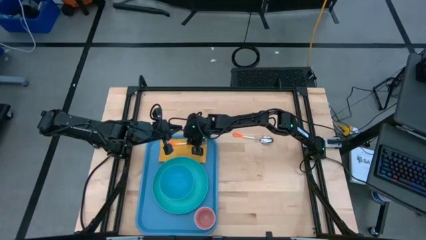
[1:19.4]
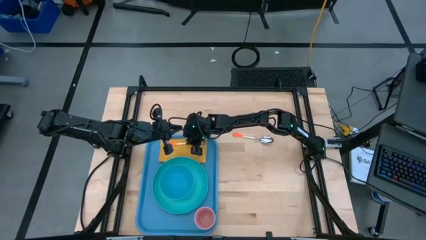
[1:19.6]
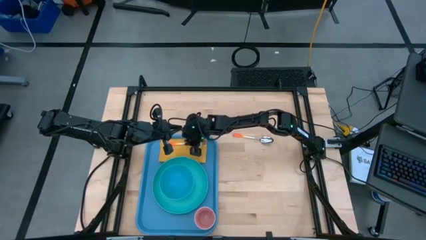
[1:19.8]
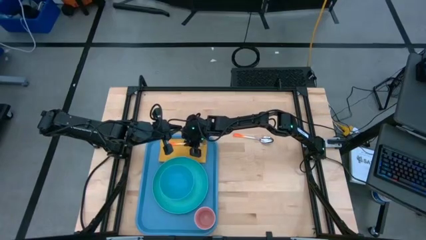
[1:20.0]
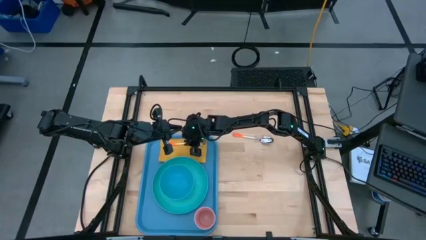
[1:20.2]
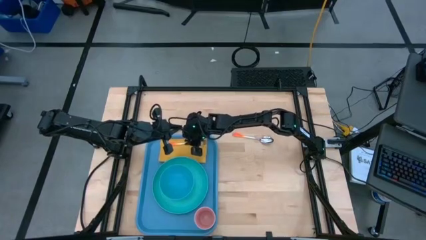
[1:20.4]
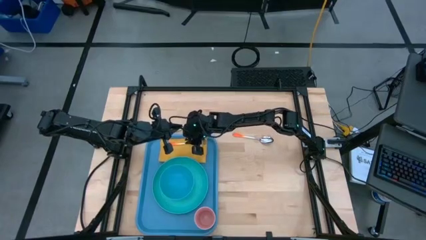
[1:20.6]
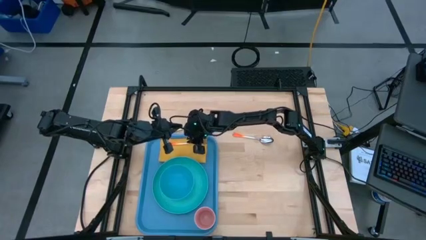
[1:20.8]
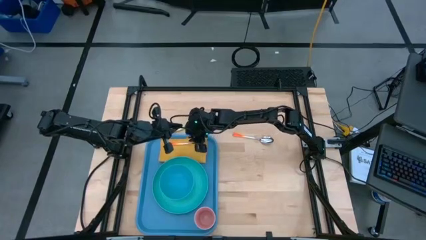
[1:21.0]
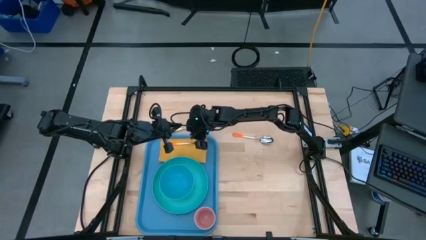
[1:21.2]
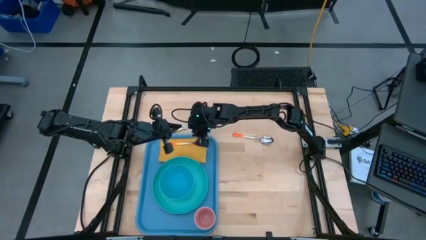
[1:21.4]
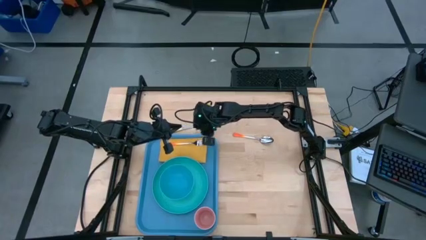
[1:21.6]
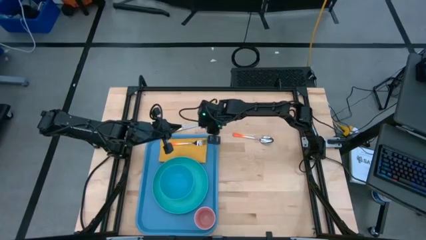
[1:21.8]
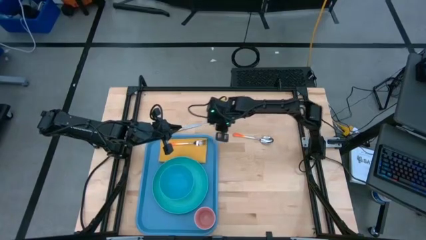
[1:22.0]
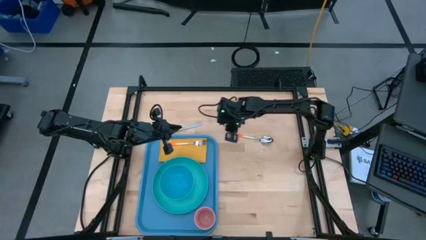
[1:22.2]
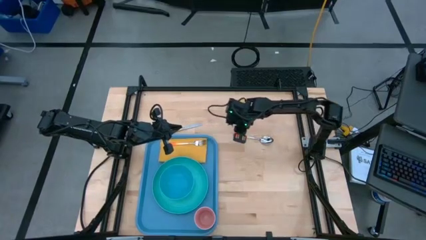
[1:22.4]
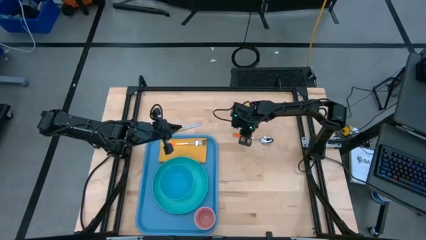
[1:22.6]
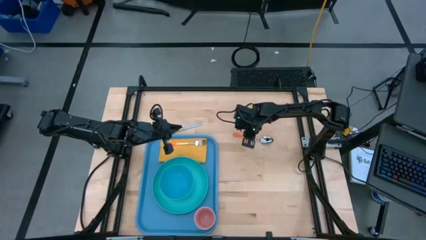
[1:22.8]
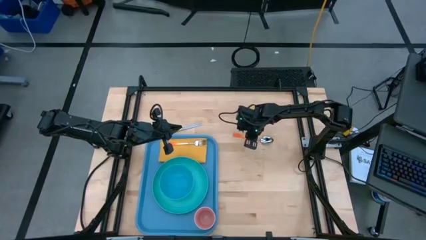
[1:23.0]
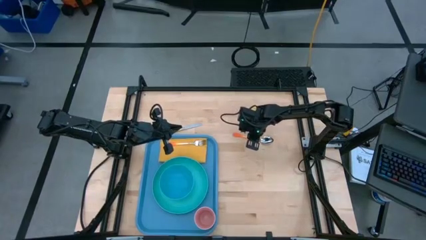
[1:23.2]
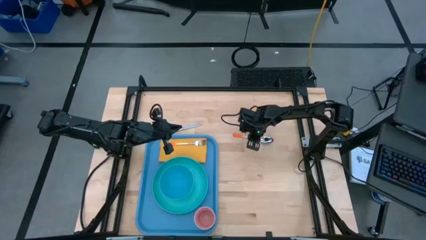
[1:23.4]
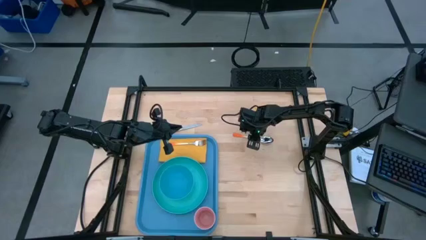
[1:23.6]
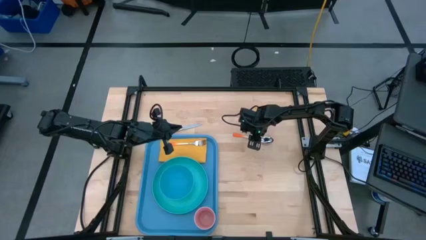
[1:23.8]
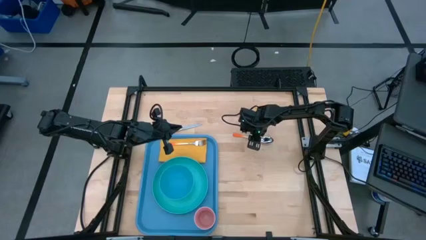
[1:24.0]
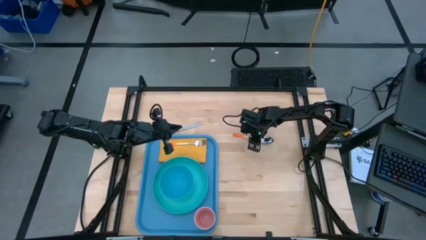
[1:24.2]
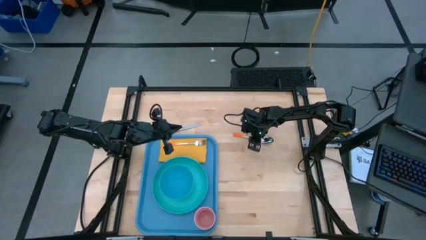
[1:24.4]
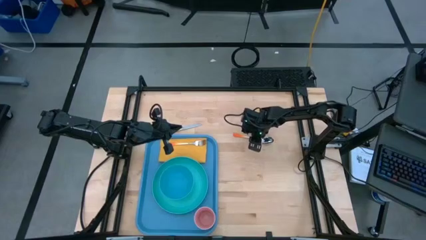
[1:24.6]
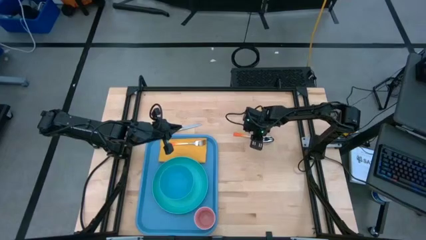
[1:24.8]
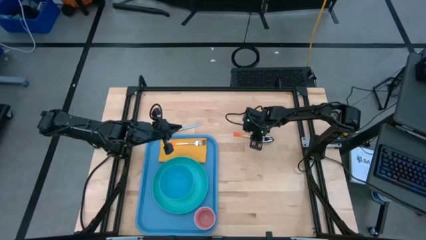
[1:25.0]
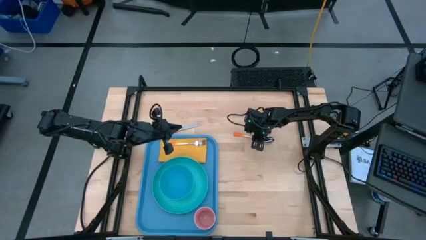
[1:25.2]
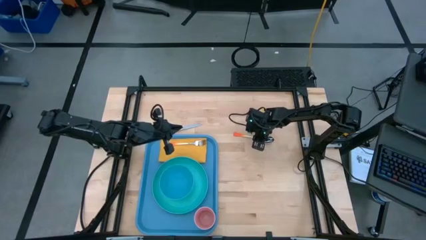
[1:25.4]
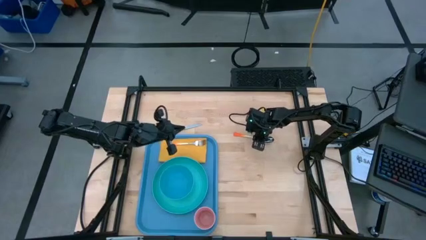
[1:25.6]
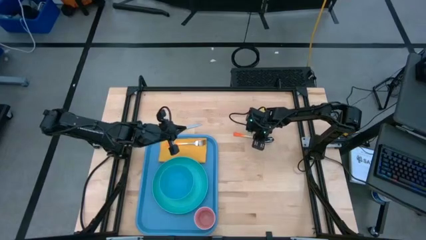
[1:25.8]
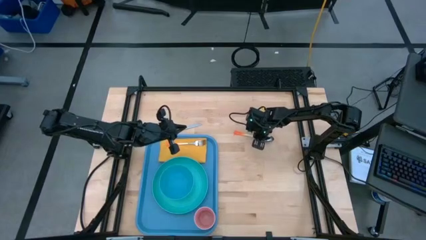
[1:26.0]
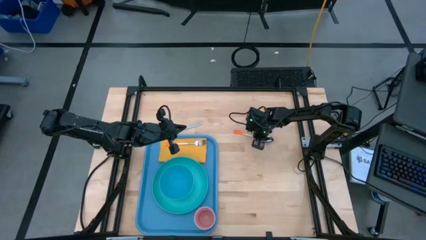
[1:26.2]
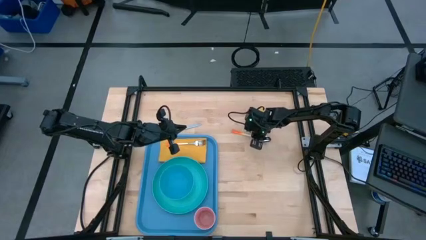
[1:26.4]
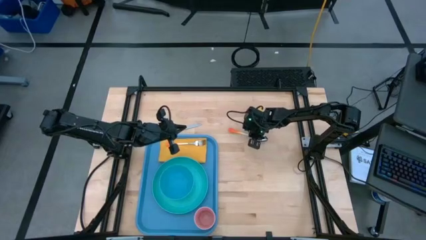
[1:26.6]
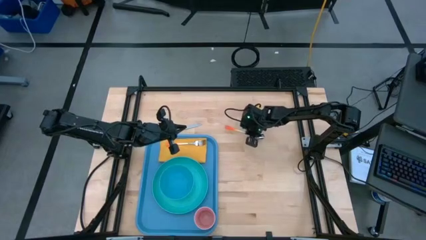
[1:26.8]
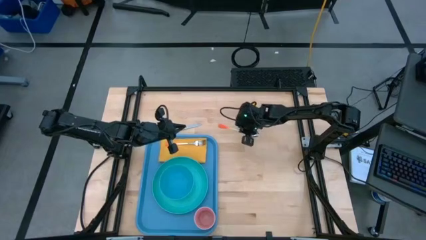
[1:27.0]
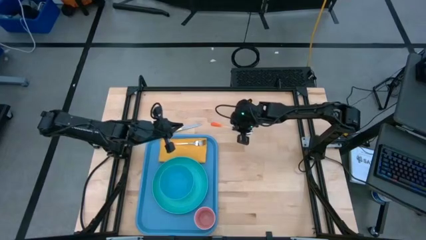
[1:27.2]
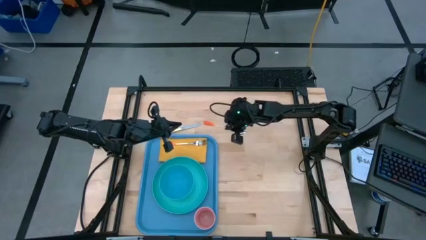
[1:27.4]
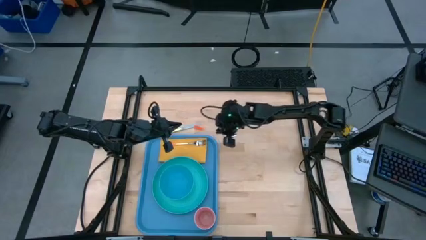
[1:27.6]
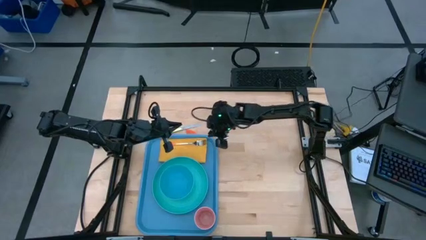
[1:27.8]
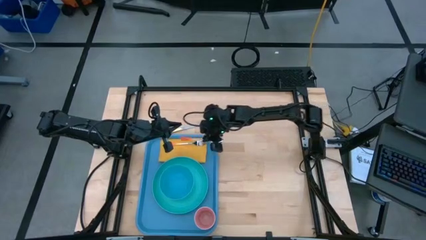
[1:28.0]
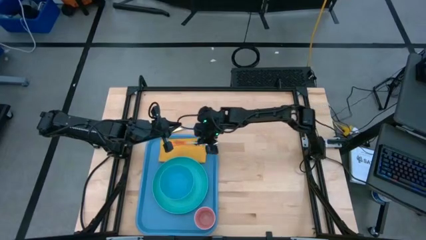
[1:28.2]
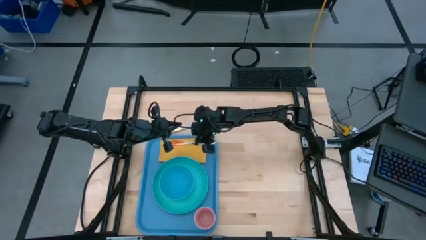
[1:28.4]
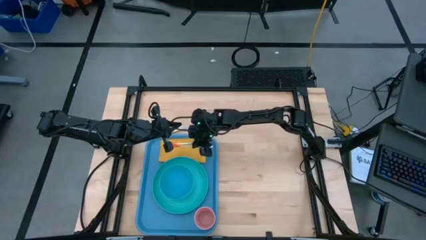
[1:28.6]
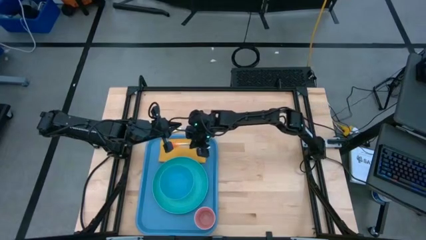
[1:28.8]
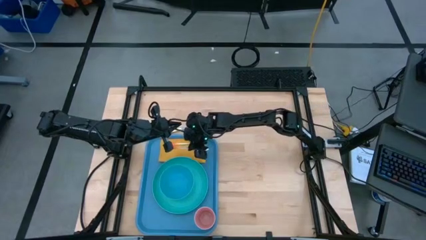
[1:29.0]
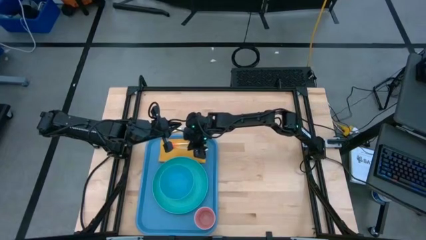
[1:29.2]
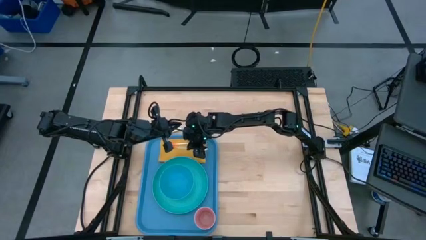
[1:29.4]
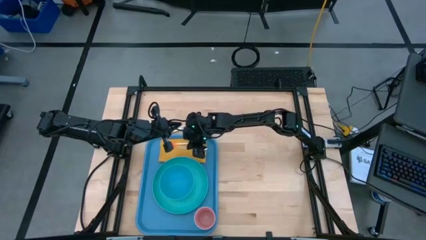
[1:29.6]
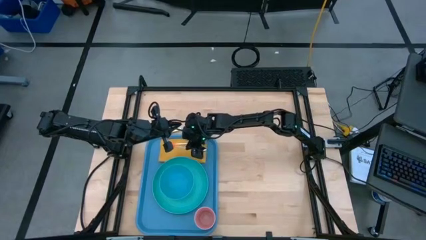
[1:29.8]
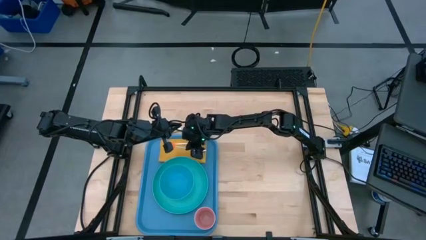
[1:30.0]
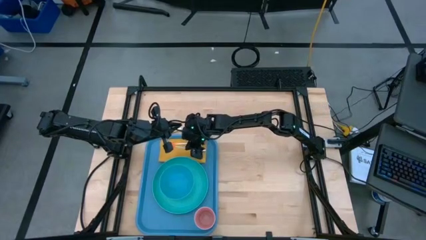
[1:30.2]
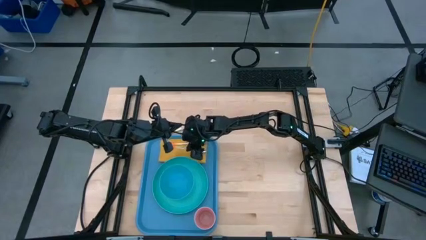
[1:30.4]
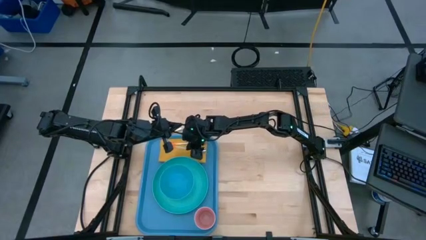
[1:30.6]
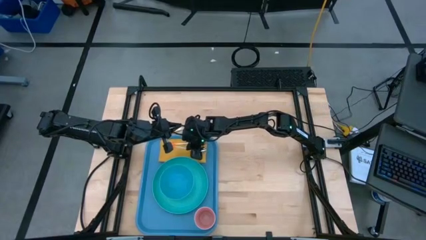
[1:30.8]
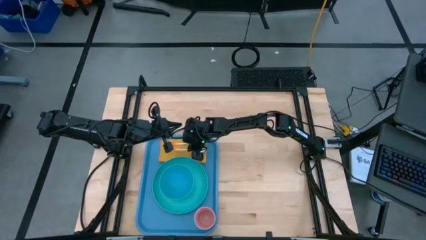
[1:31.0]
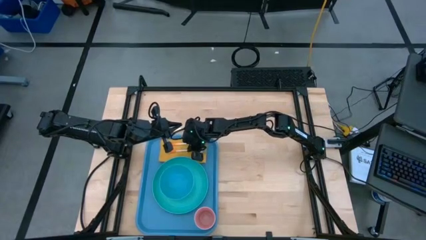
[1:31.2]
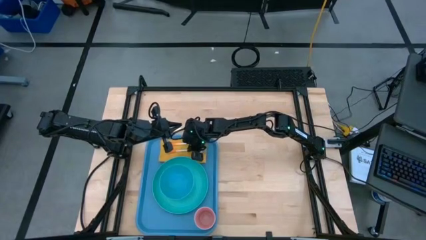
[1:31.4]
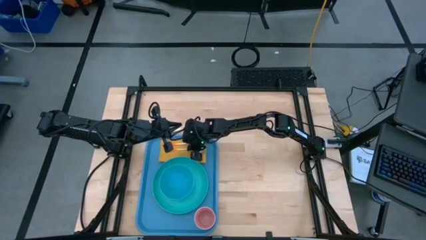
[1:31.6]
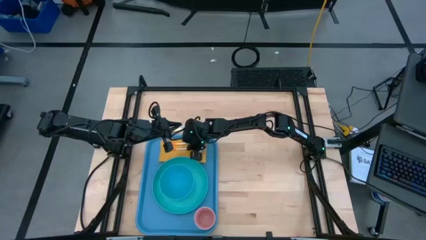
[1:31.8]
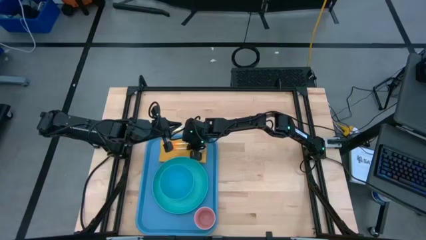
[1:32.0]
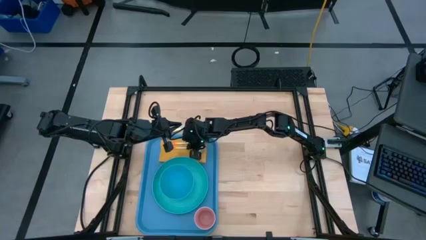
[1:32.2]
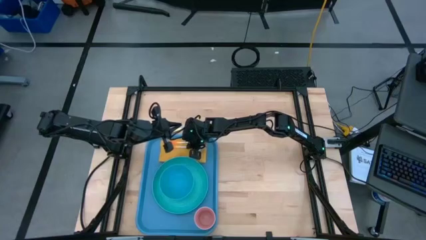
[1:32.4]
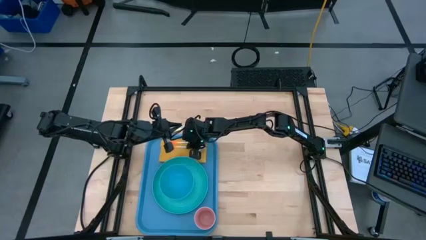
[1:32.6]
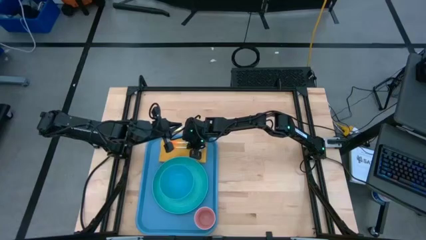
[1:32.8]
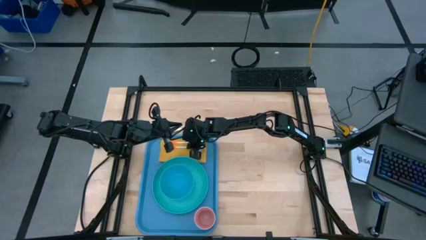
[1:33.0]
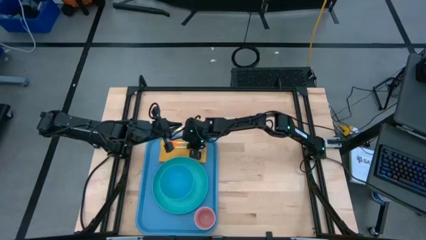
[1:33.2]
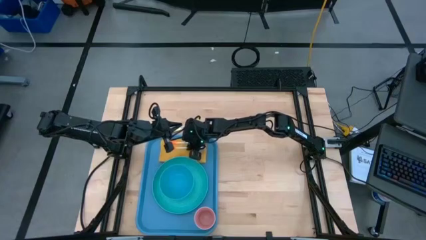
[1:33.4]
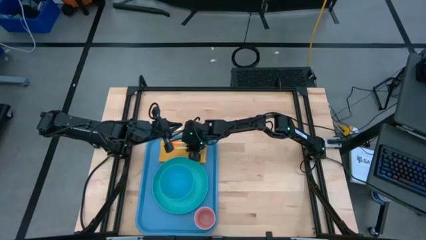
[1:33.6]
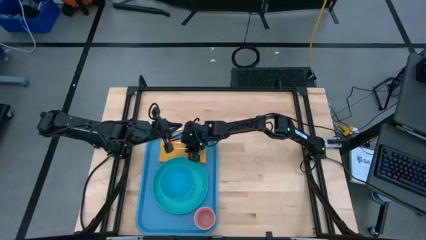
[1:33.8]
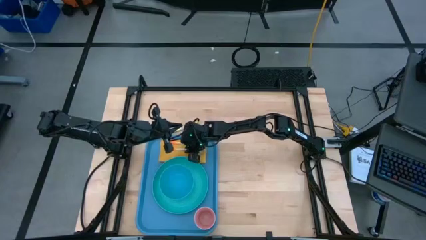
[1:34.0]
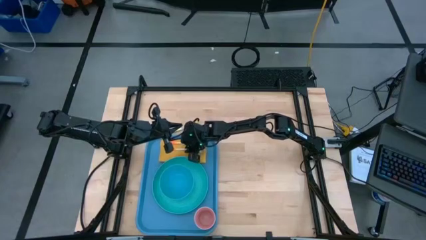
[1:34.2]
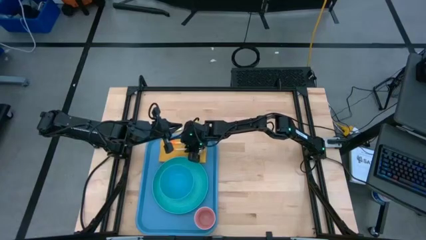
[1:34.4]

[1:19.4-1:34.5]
Task: Set up tray
Put the orange spoon to the bottom of the orange fork on the yellow napkin on the blue serving tray
